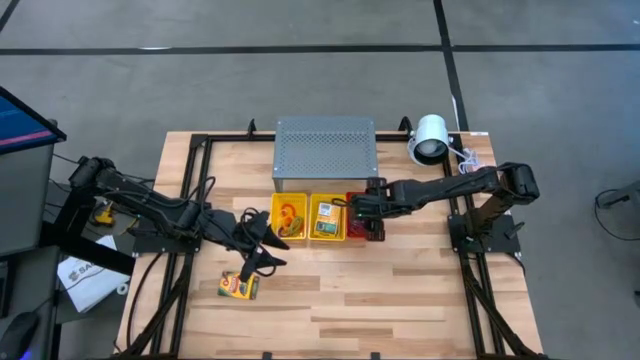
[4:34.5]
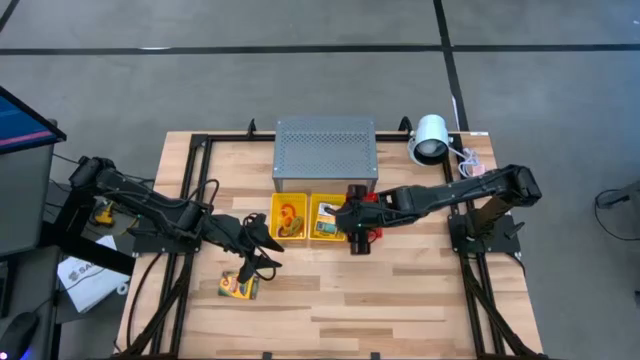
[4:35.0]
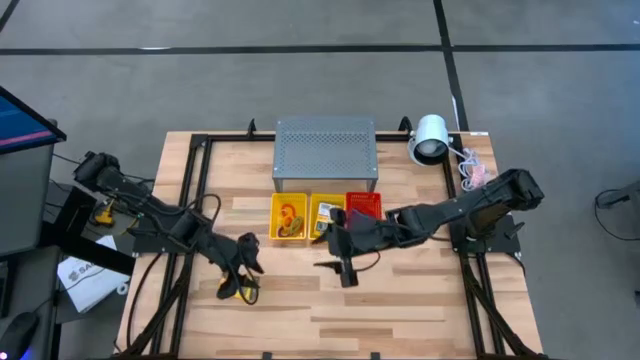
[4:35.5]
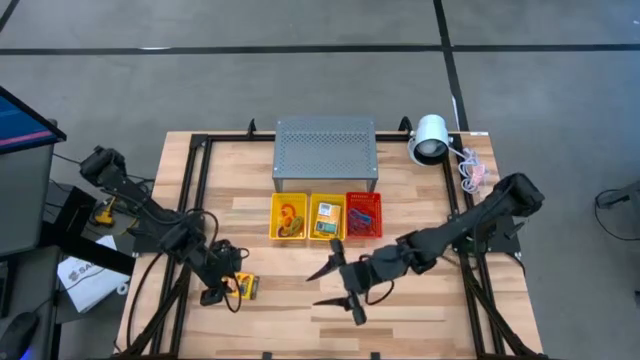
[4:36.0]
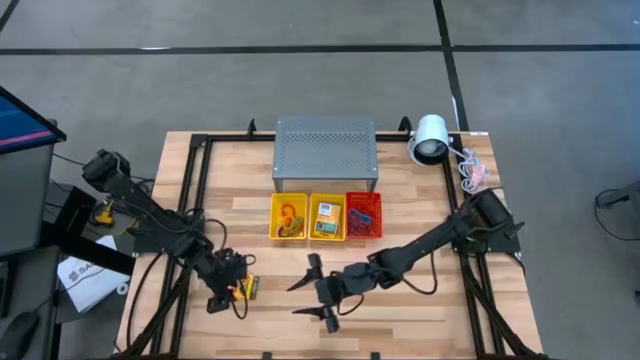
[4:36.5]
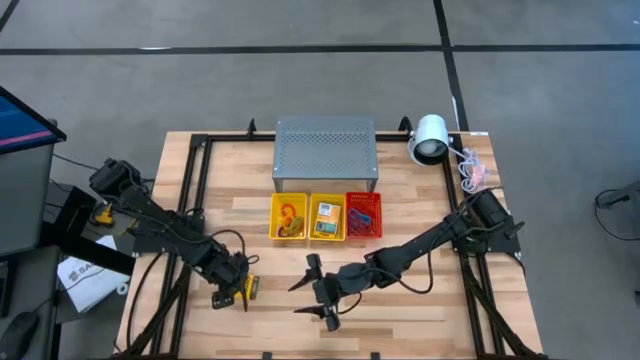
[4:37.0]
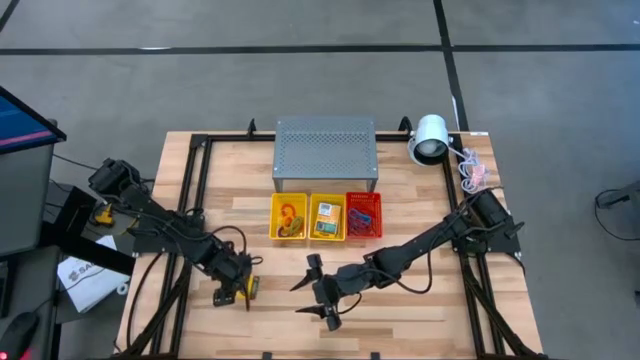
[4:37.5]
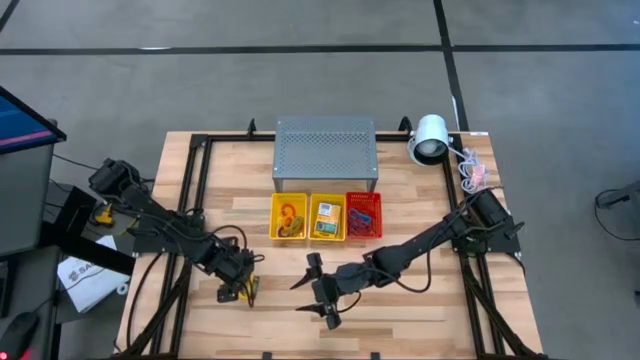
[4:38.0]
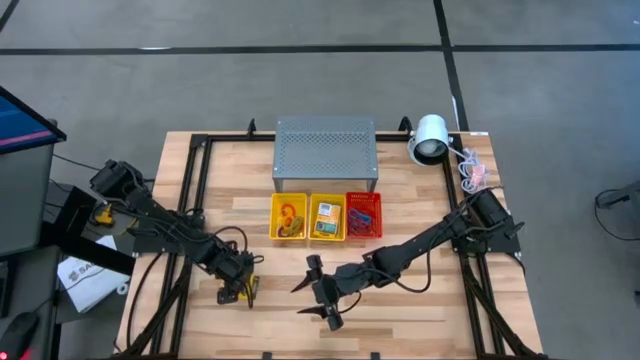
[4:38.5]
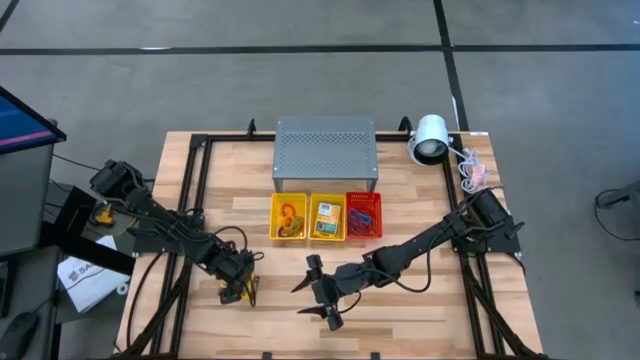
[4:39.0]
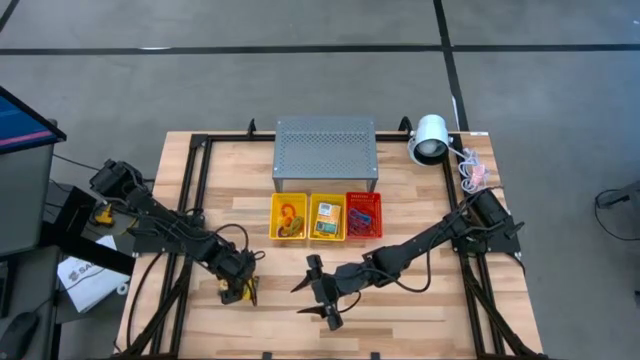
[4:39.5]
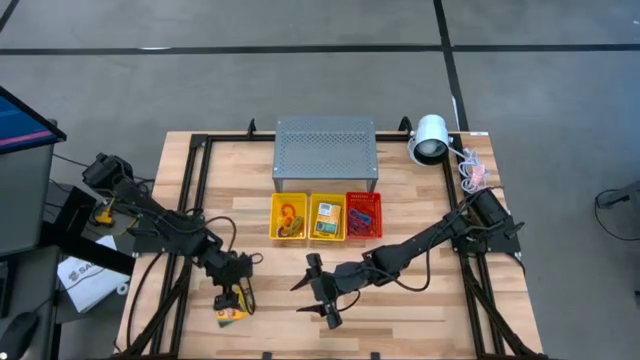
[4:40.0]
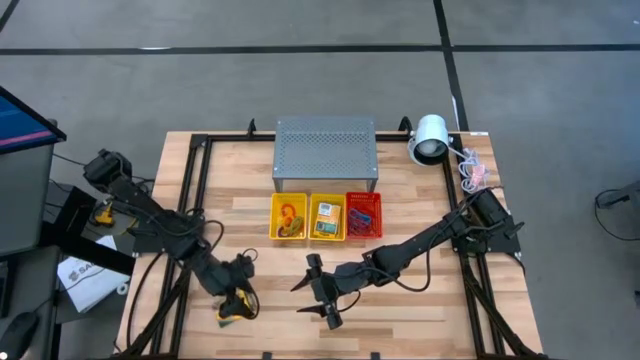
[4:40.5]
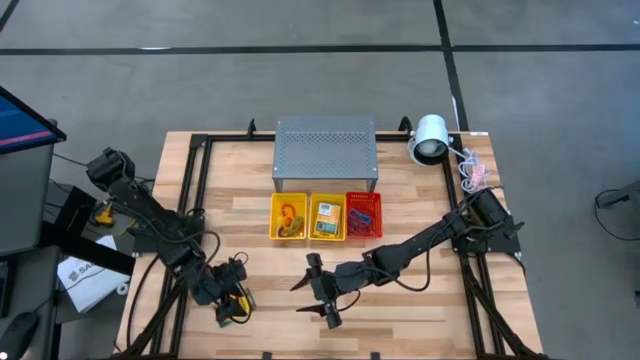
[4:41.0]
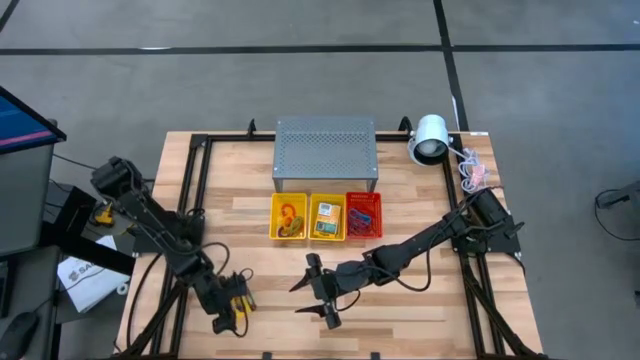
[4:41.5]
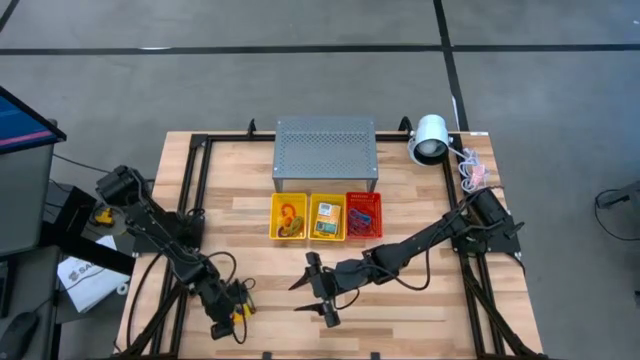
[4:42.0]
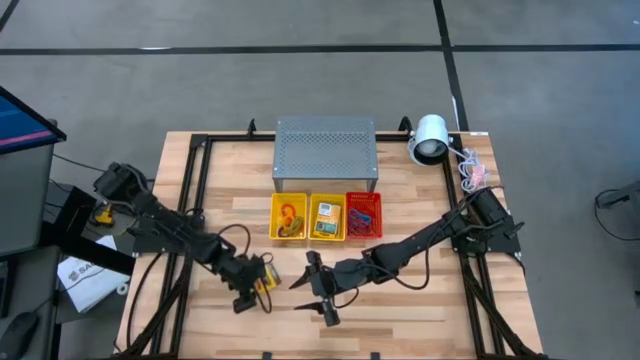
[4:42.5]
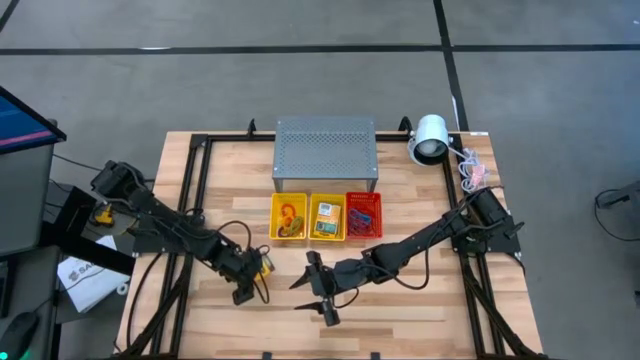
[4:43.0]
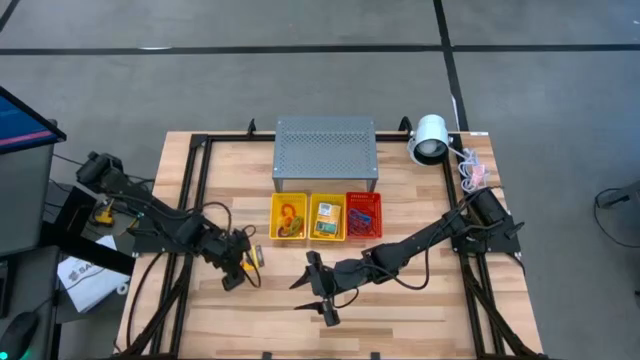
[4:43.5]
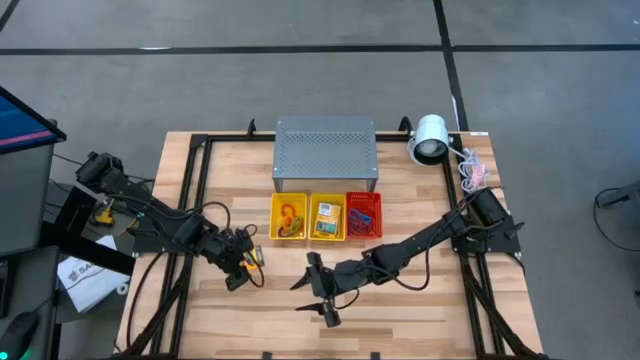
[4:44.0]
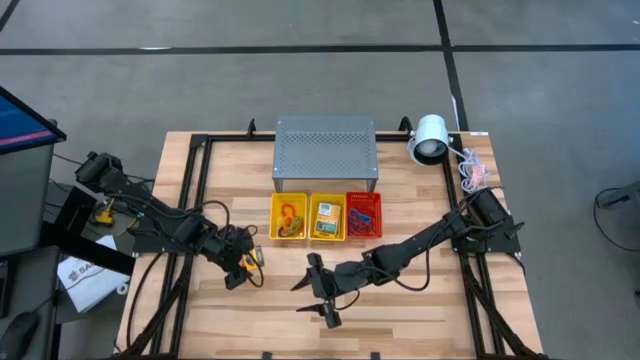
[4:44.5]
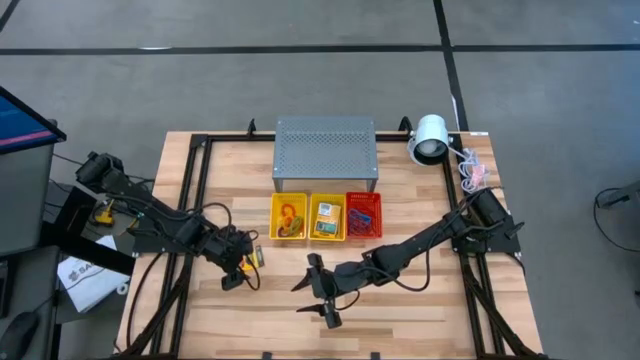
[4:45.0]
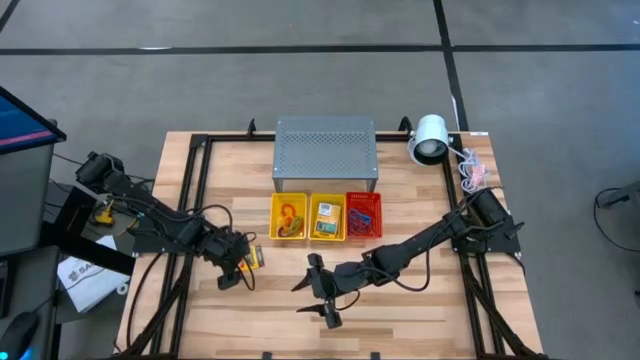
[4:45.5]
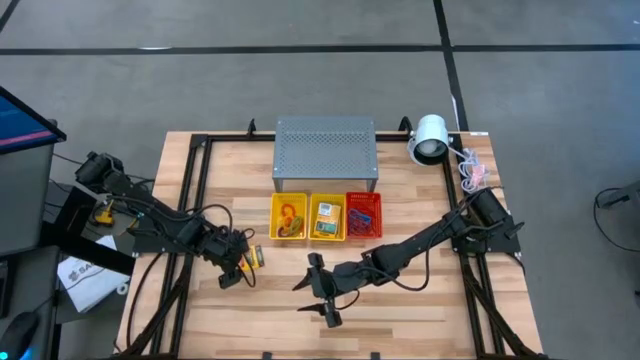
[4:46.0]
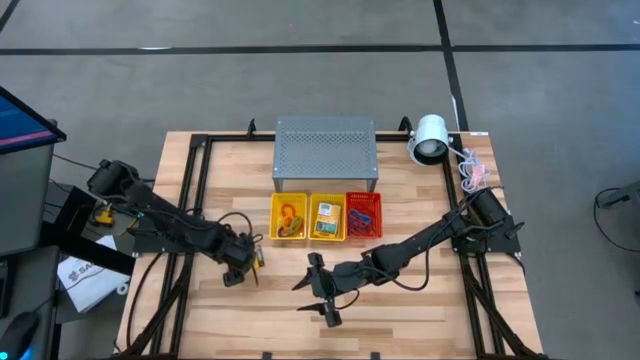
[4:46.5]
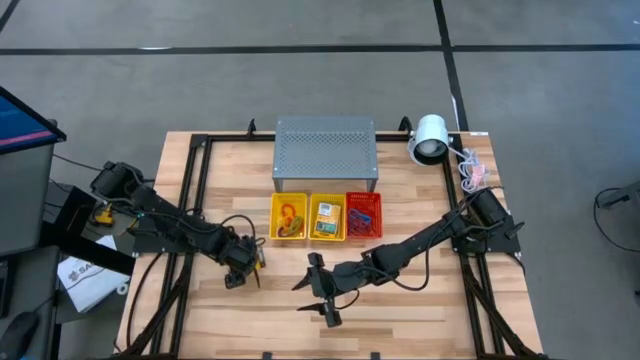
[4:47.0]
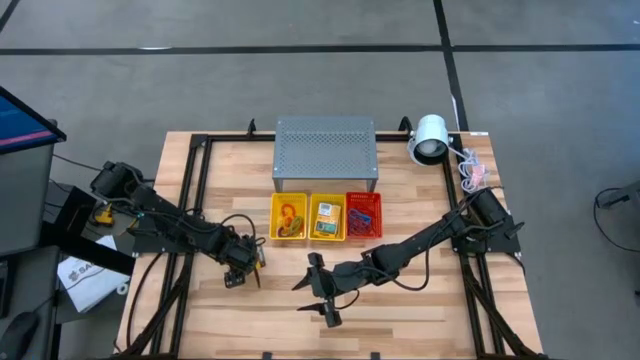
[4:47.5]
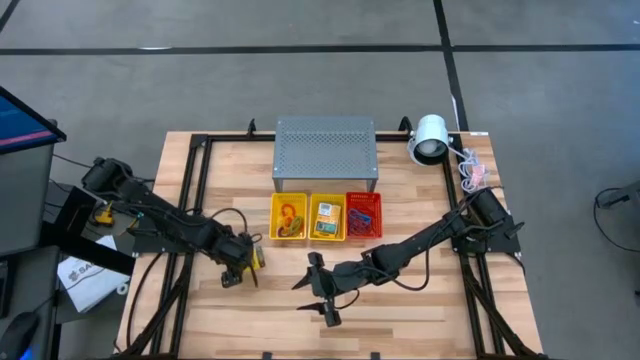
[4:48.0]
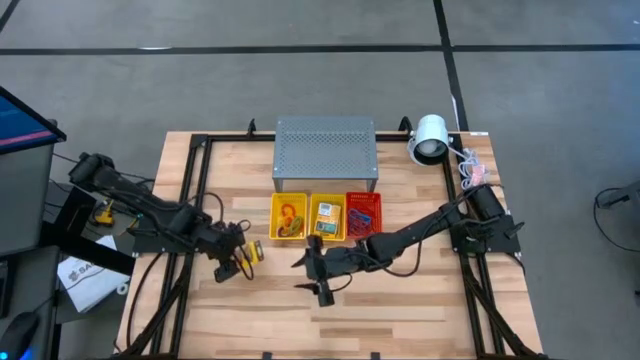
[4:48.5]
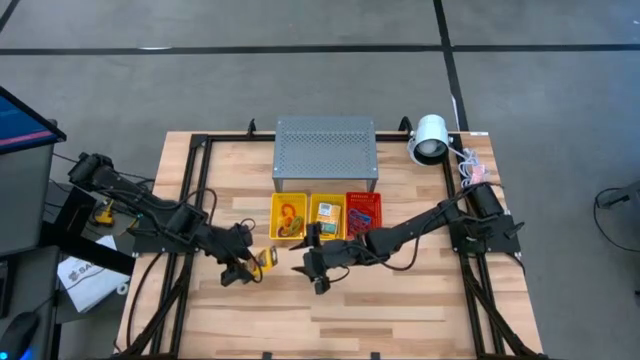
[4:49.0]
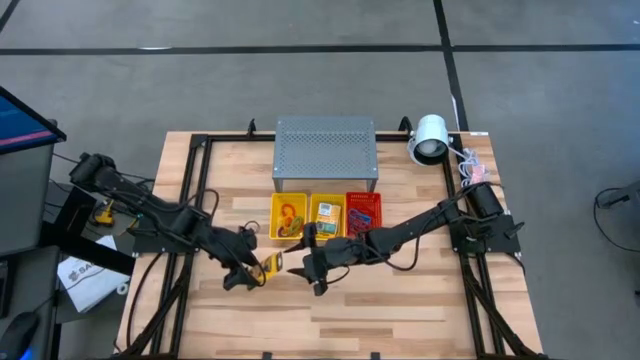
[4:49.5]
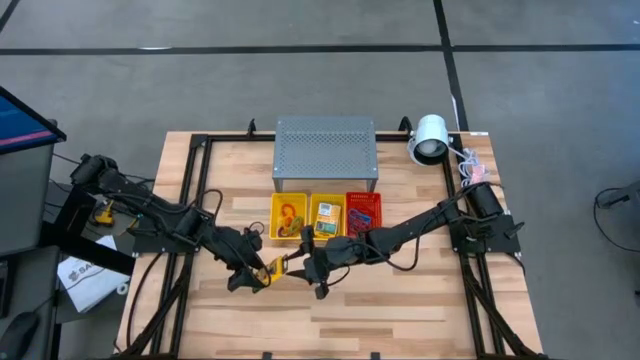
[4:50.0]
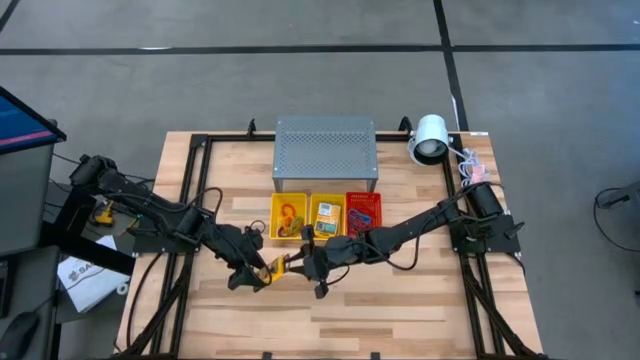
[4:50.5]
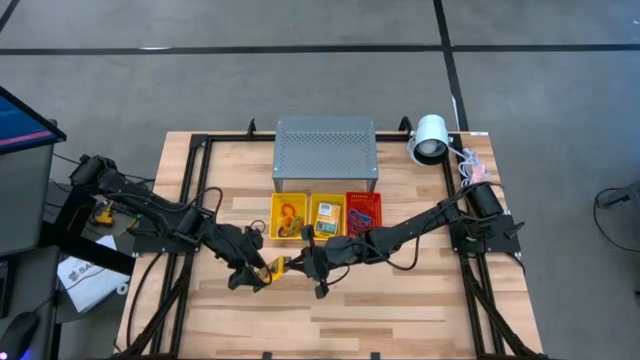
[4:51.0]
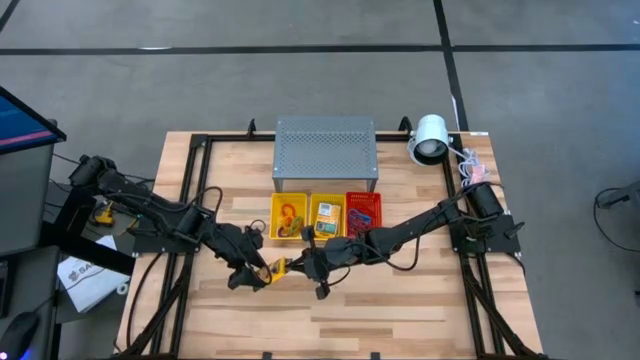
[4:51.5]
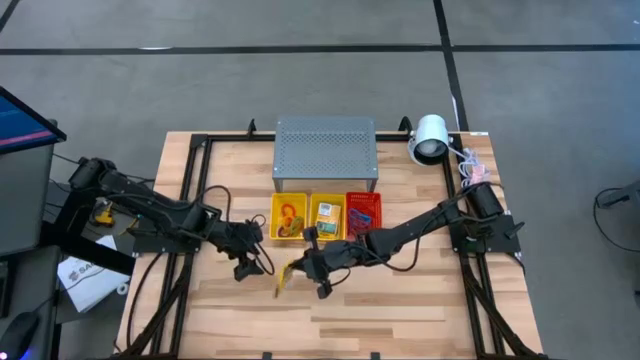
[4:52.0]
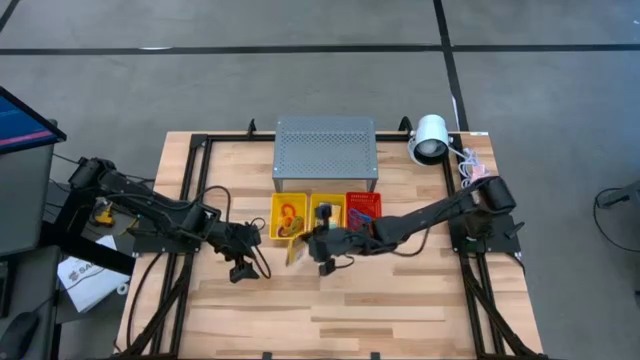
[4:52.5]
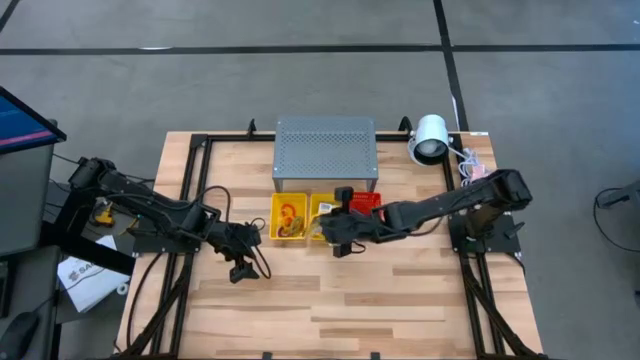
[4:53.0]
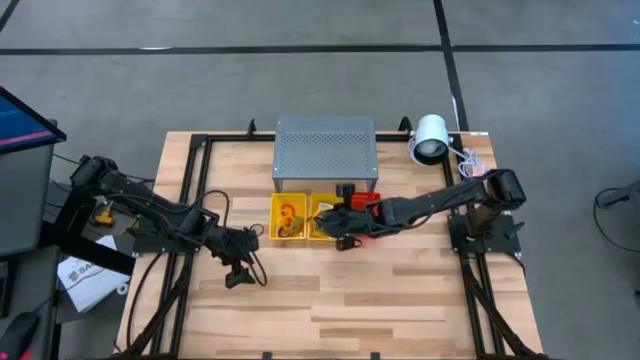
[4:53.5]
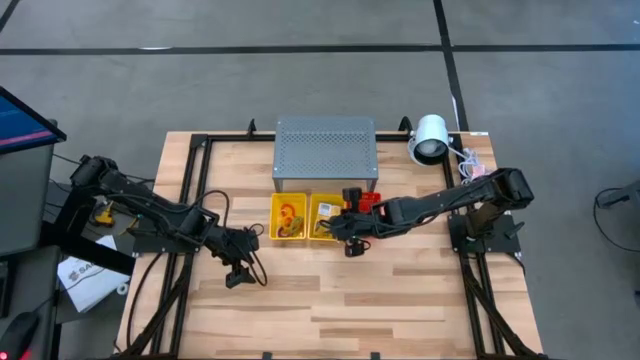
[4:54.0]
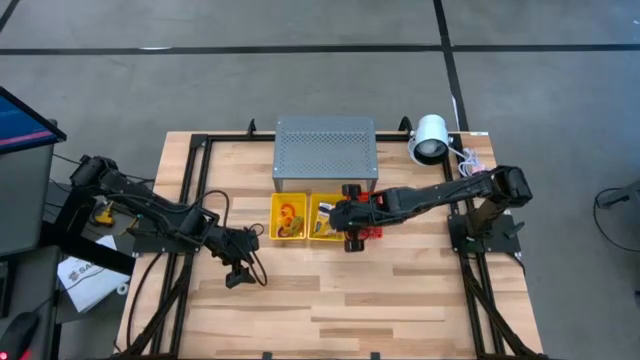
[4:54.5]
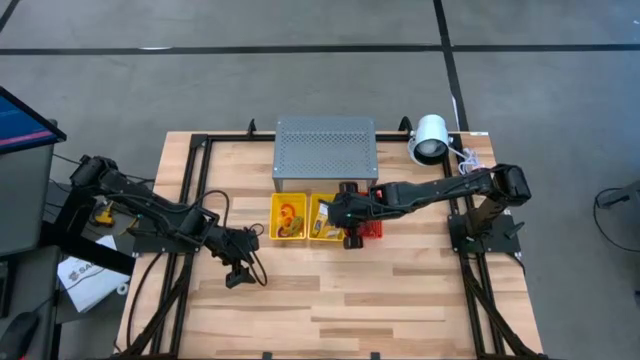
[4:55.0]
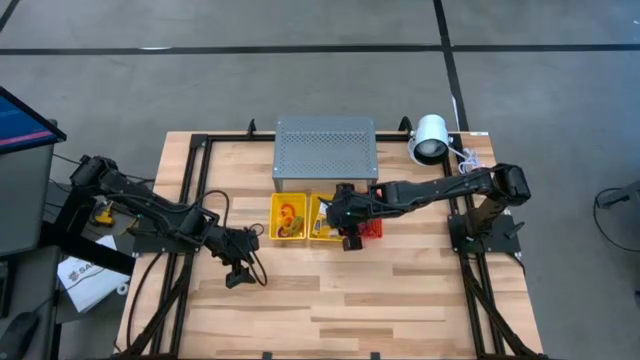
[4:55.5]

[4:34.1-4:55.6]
Task: Pick & Place Office Desk Supplies
Put the yellow crayon box into the right yellow bin
